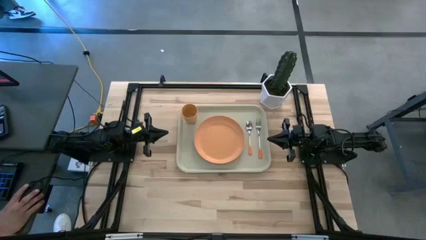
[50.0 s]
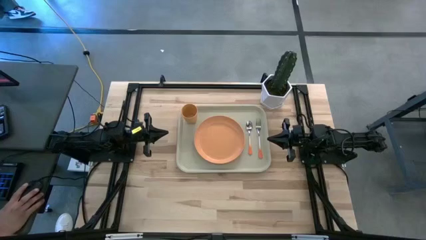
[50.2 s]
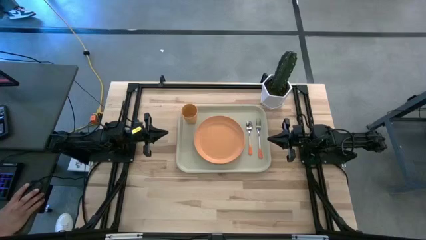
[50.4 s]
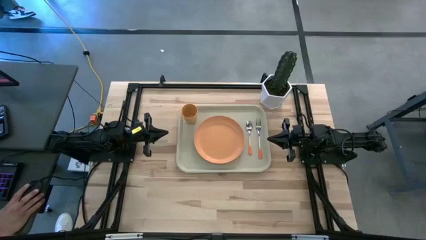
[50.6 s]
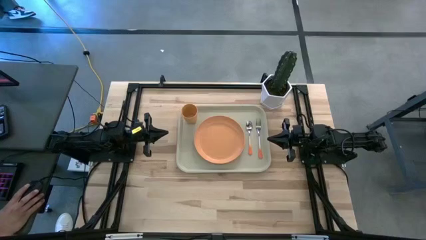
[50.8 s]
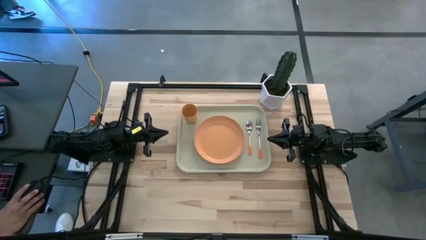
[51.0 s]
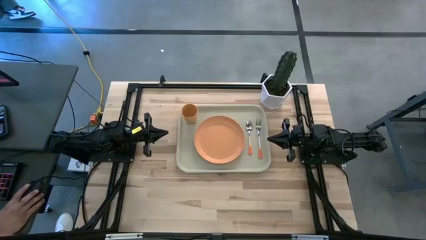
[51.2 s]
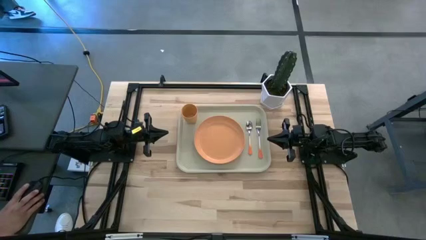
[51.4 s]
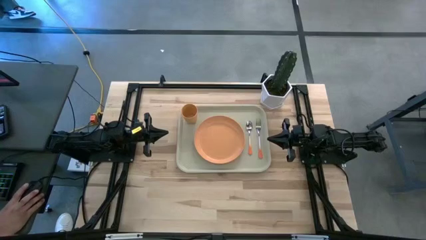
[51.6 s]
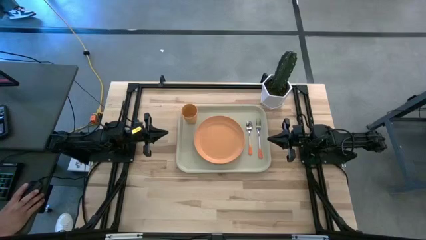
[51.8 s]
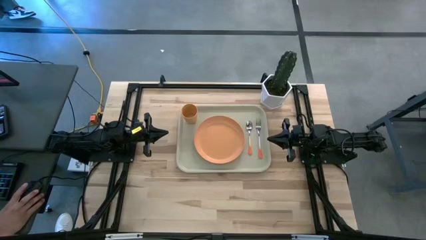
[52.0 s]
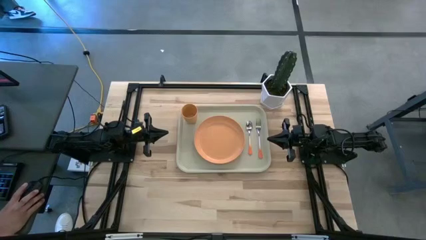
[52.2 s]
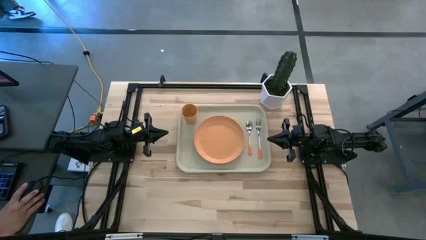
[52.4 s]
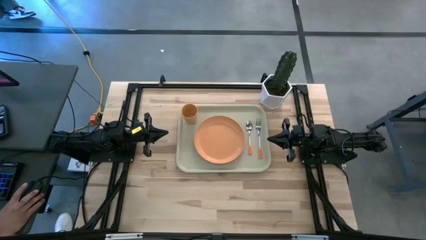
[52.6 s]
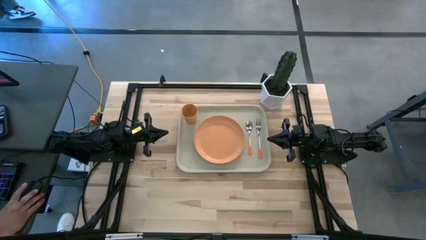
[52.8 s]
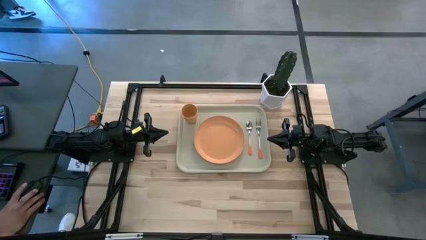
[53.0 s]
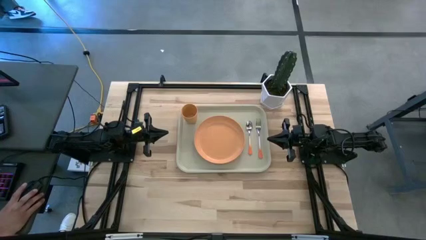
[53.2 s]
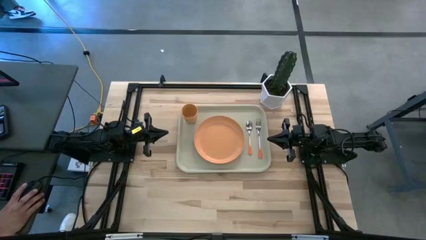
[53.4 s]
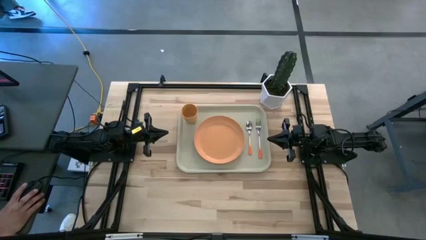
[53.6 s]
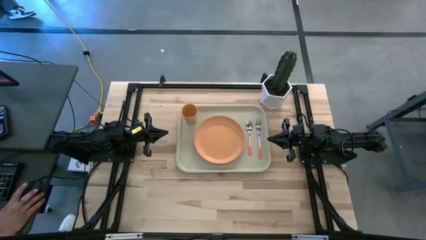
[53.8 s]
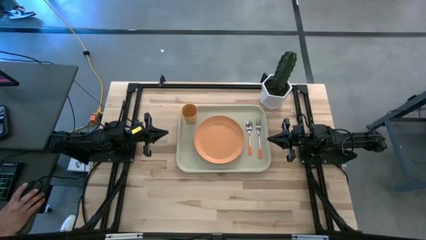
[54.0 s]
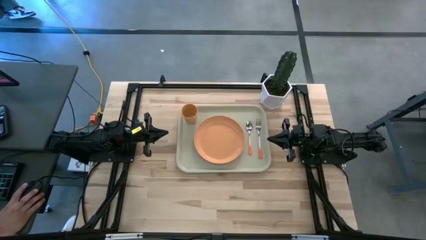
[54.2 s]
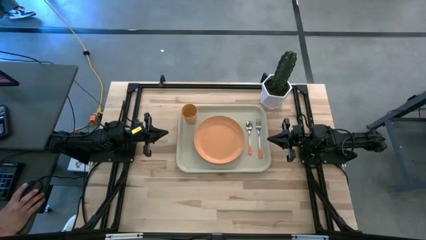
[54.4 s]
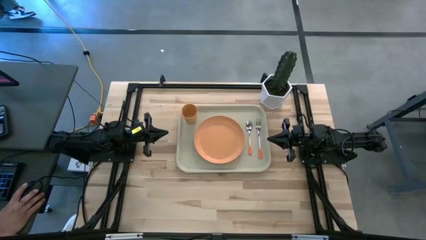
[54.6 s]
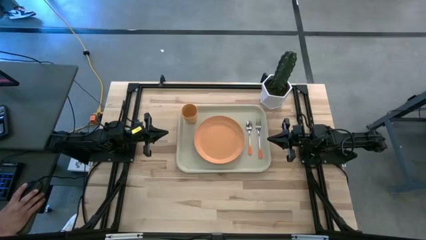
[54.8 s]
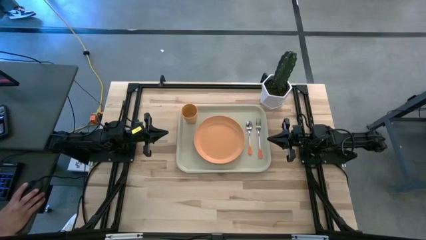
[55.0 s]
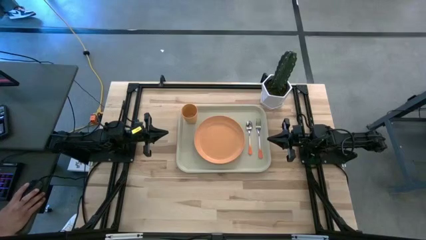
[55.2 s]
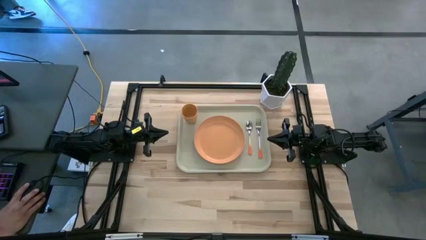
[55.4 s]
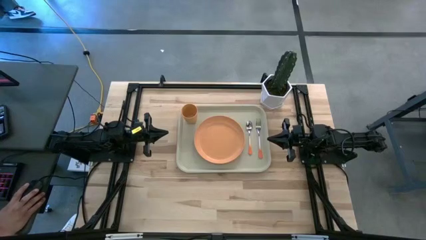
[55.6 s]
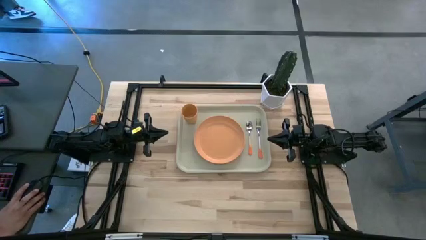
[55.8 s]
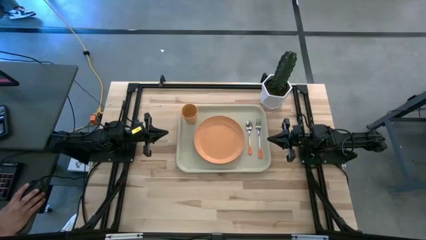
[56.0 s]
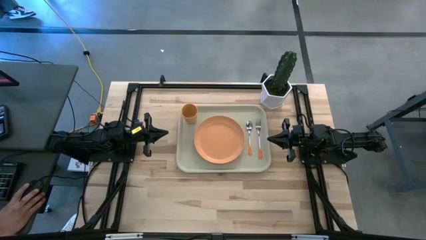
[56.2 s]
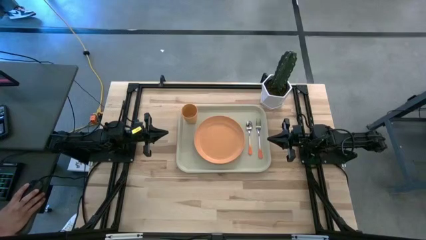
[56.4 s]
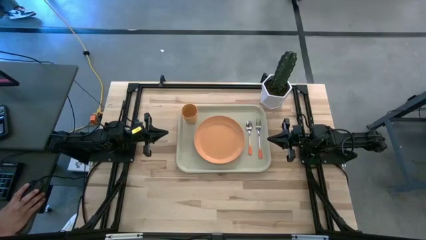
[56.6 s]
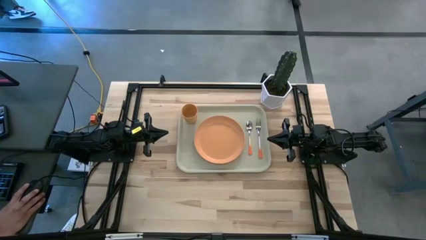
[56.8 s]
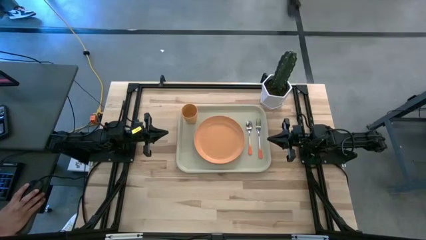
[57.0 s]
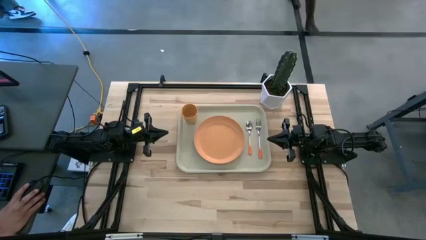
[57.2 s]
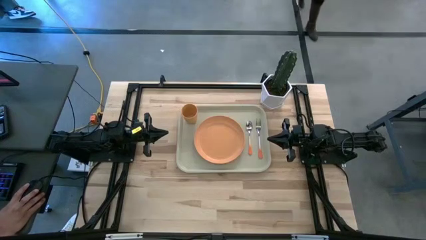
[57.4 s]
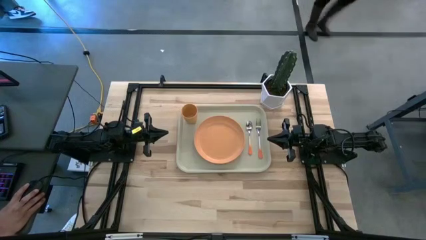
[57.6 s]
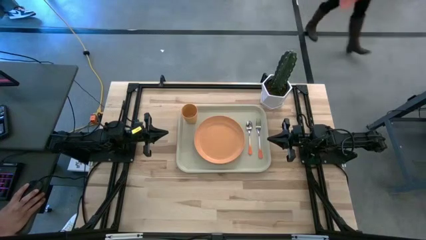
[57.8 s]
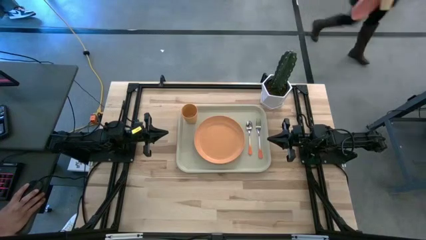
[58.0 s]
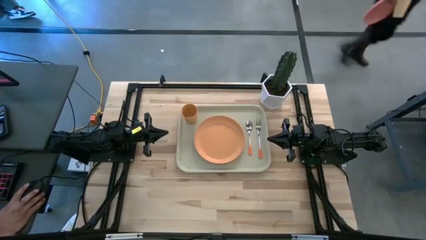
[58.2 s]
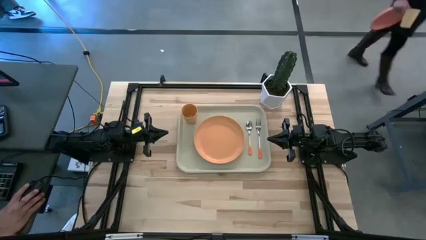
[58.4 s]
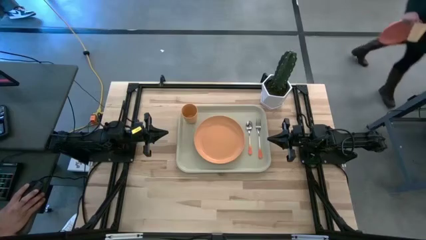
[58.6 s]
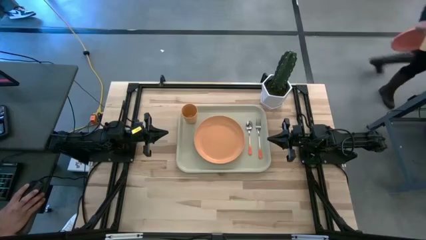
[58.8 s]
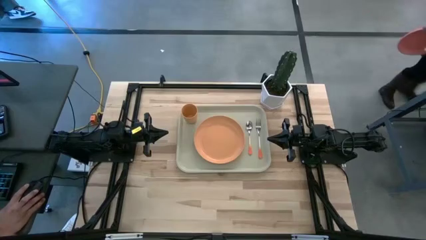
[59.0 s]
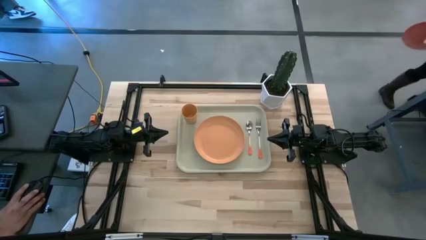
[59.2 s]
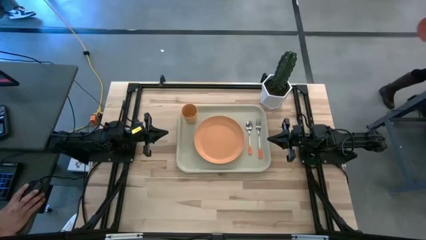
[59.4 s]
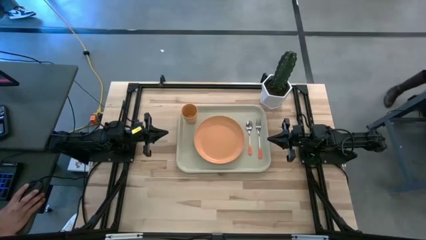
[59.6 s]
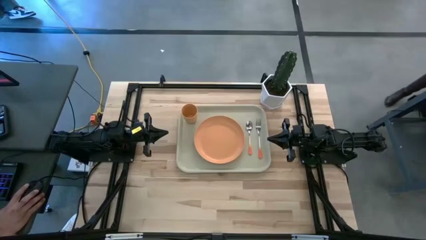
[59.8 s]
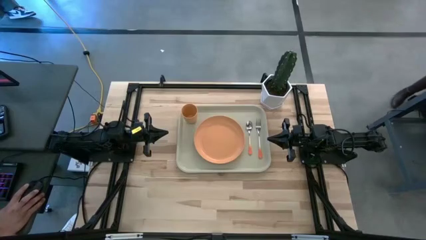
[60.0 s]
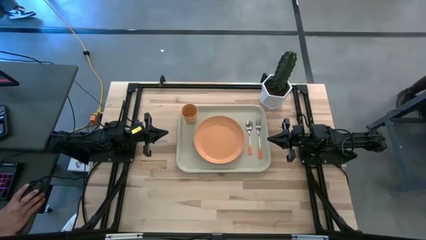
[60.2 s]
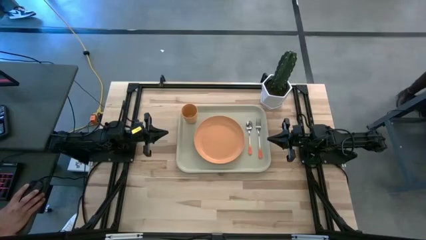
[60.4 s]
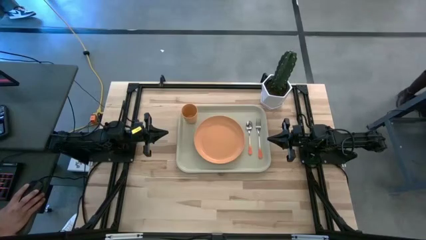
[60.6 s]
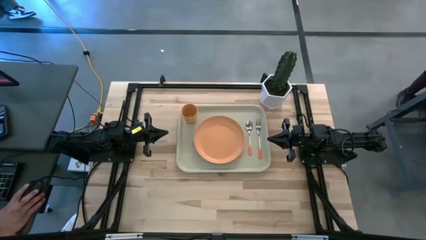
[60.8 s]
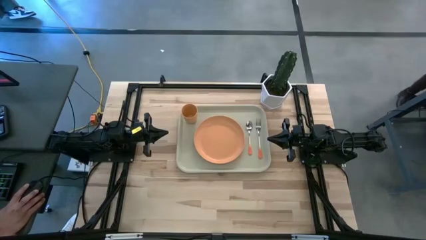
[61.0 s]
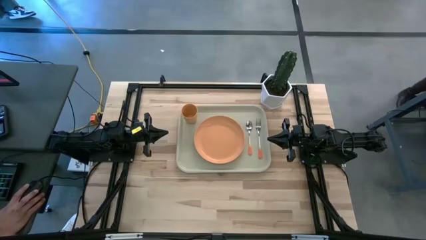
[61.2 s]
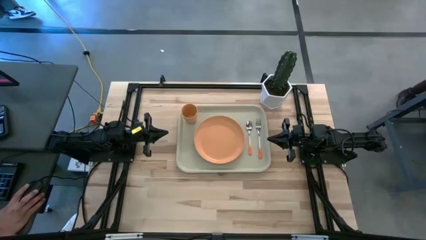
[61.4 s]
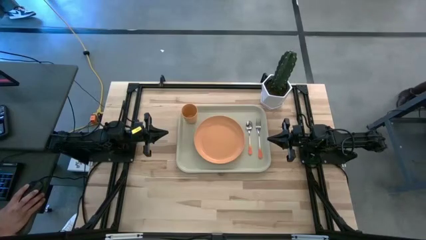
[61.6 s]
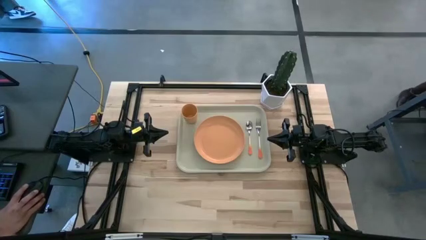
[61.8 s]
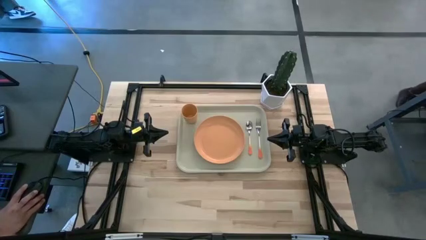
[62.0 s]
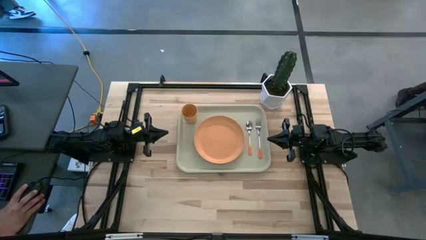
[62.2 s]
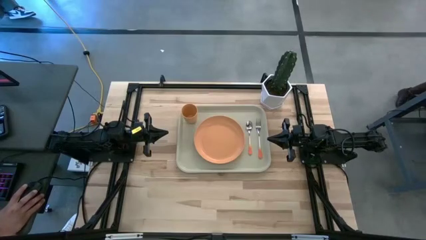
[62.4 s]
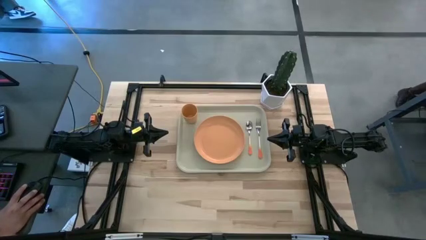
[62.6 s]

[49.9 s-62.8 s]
Task: Pick and place plate/cup/fork/spoon on tray
Return to Home Position
